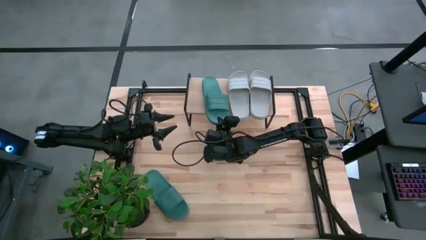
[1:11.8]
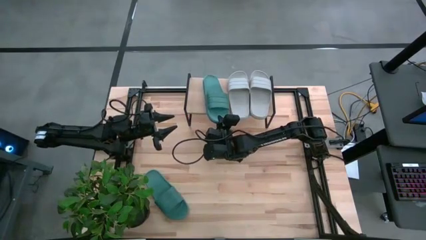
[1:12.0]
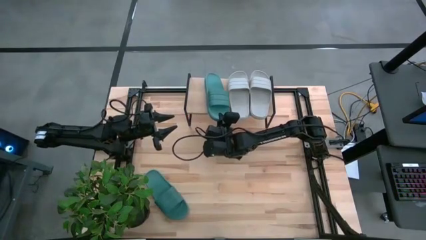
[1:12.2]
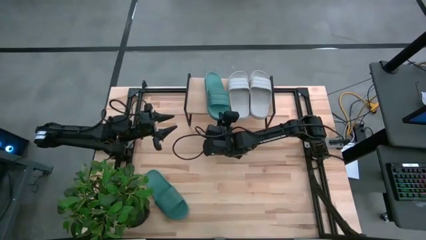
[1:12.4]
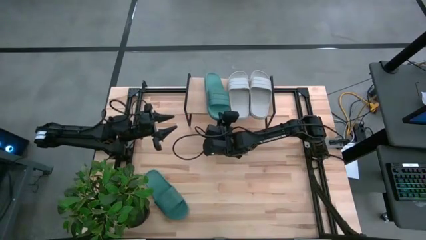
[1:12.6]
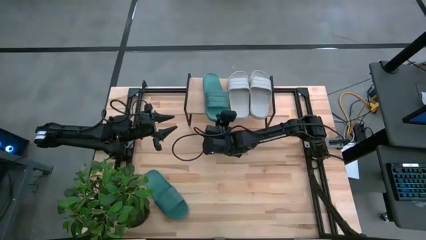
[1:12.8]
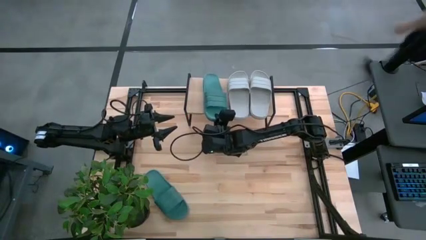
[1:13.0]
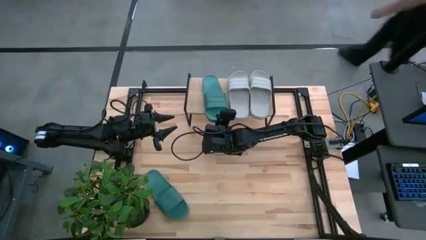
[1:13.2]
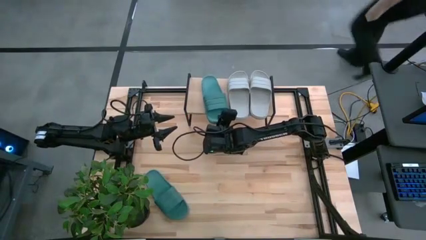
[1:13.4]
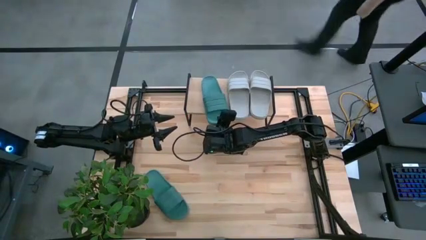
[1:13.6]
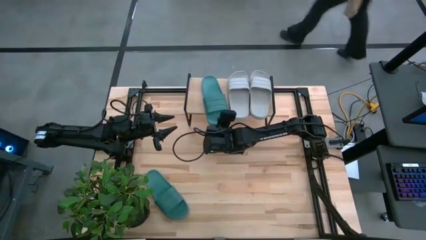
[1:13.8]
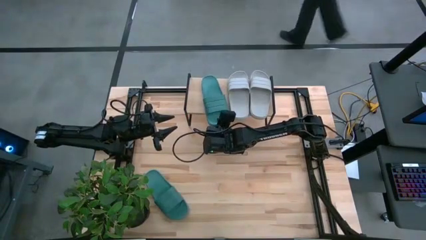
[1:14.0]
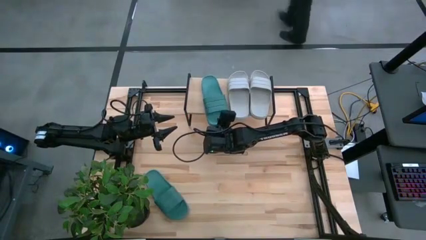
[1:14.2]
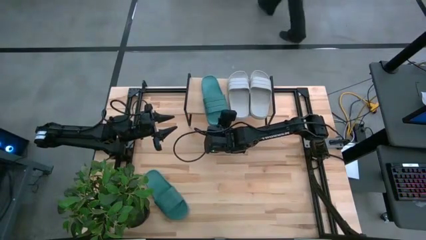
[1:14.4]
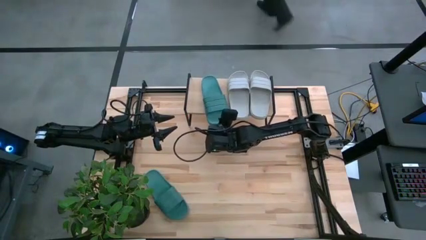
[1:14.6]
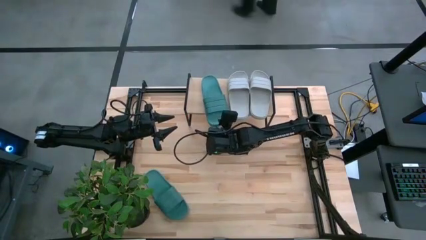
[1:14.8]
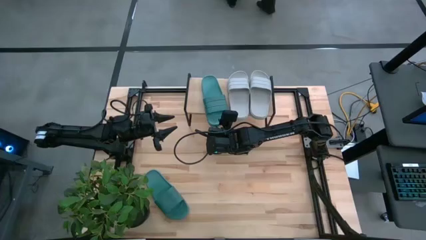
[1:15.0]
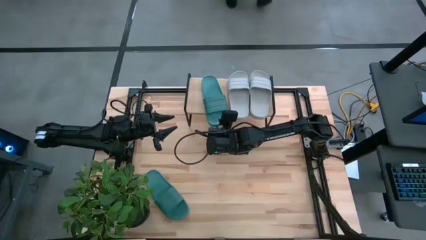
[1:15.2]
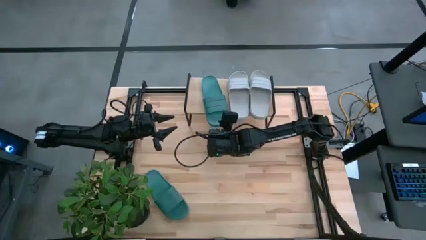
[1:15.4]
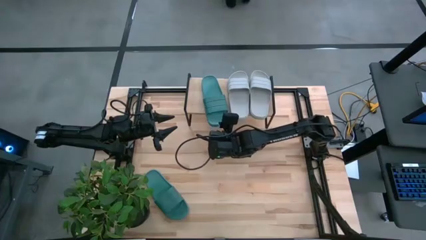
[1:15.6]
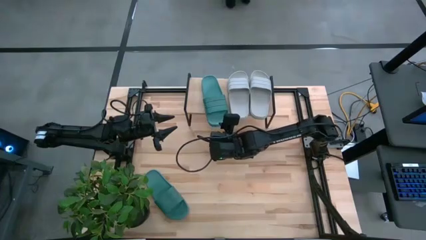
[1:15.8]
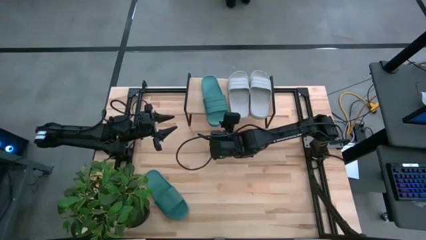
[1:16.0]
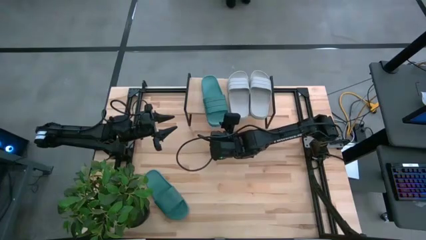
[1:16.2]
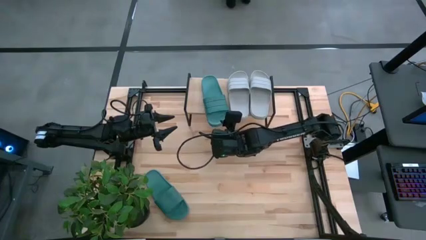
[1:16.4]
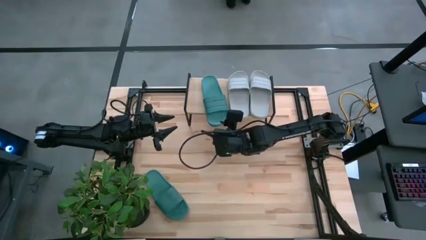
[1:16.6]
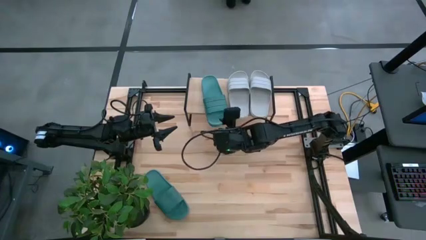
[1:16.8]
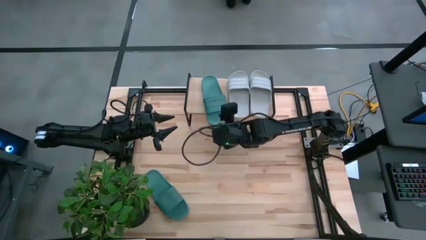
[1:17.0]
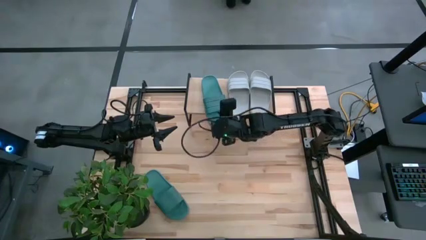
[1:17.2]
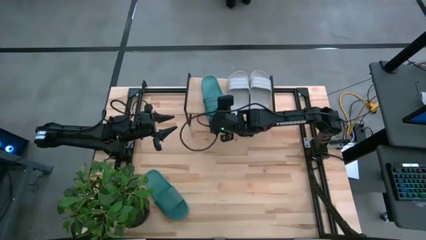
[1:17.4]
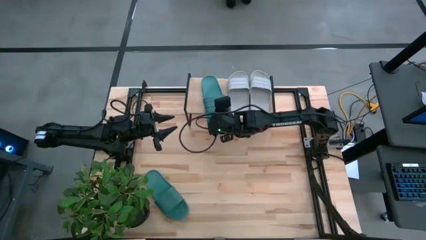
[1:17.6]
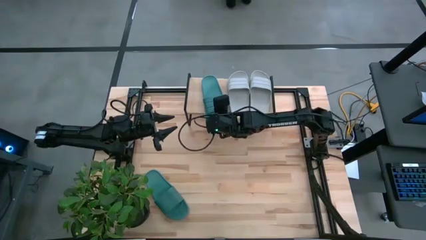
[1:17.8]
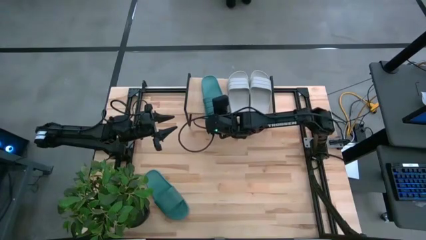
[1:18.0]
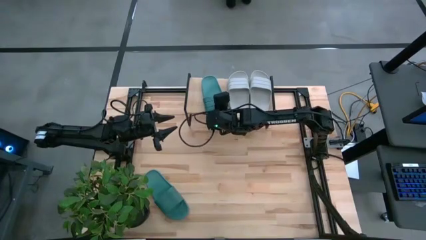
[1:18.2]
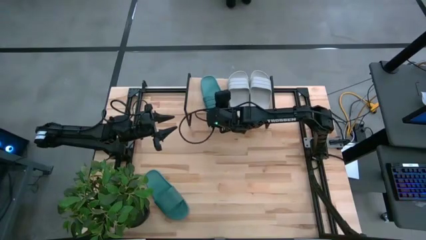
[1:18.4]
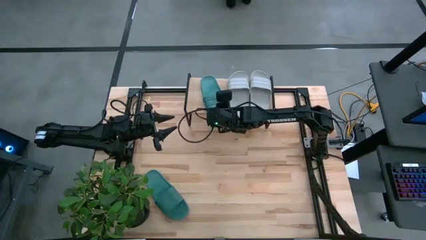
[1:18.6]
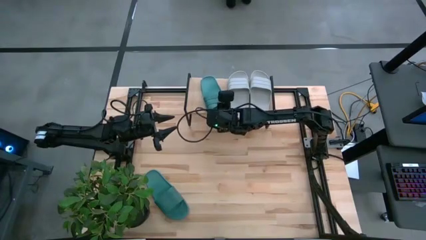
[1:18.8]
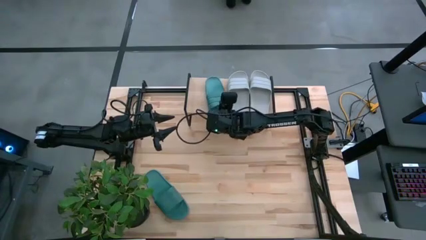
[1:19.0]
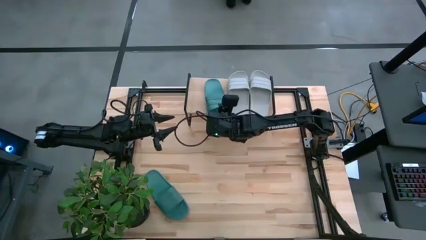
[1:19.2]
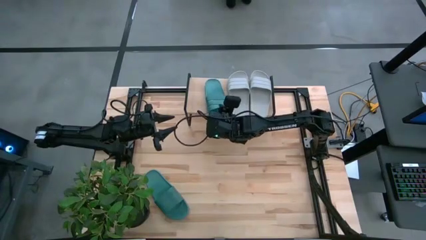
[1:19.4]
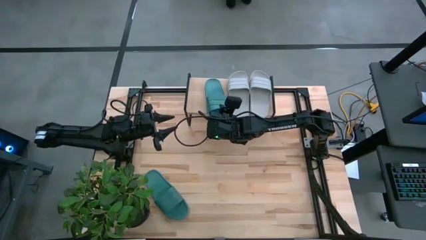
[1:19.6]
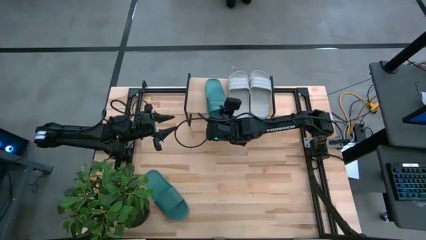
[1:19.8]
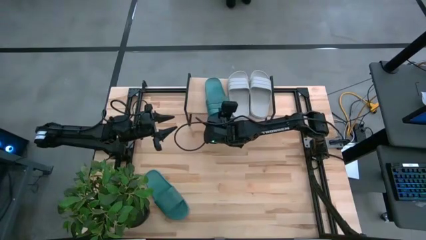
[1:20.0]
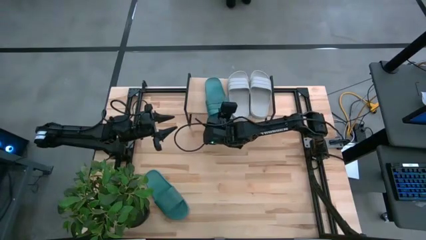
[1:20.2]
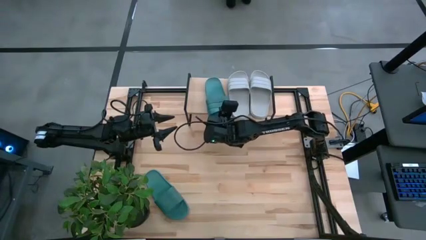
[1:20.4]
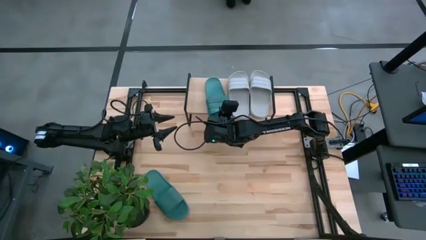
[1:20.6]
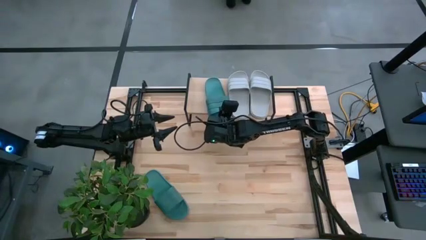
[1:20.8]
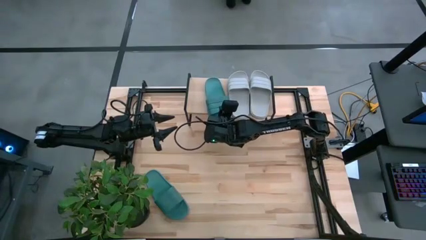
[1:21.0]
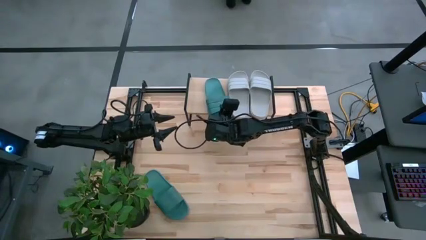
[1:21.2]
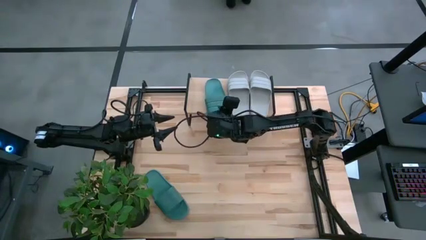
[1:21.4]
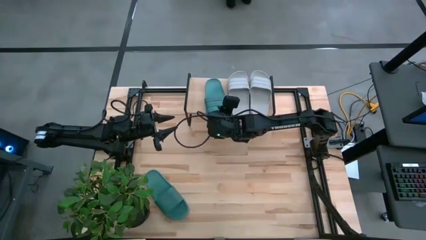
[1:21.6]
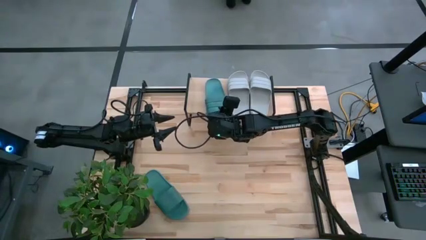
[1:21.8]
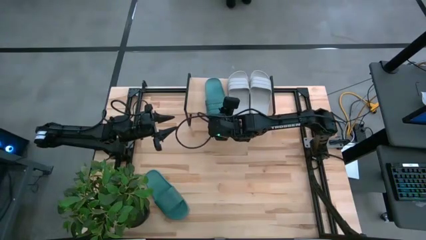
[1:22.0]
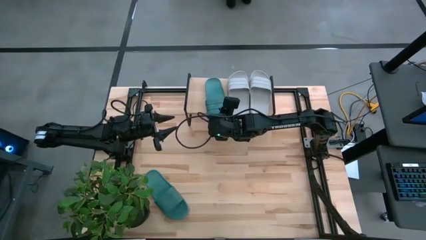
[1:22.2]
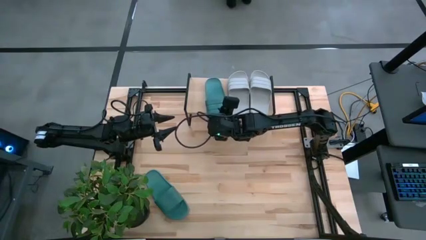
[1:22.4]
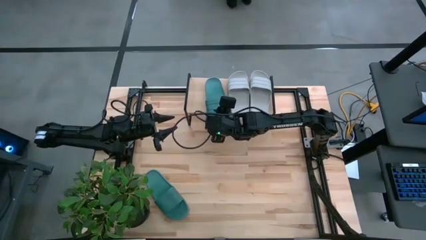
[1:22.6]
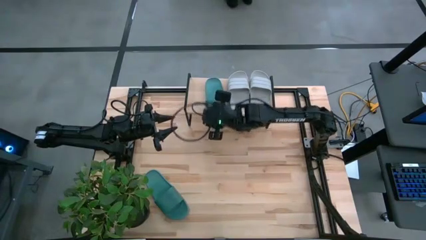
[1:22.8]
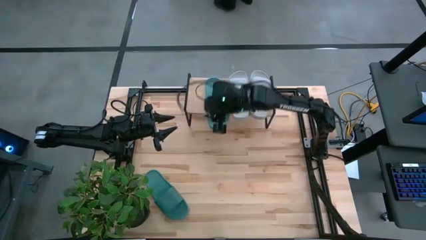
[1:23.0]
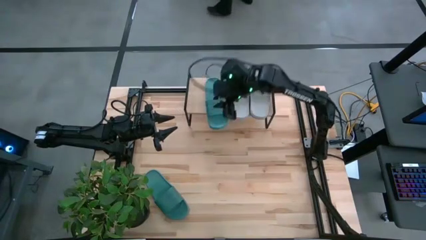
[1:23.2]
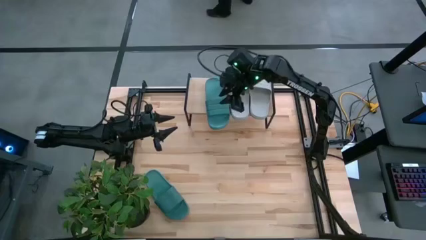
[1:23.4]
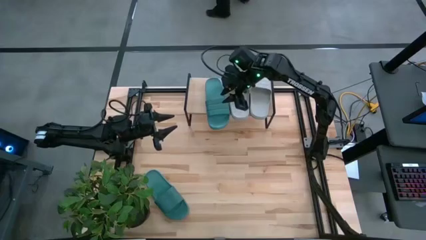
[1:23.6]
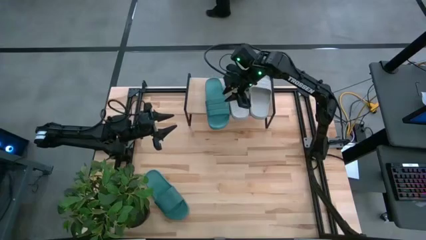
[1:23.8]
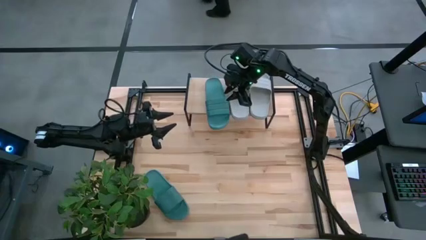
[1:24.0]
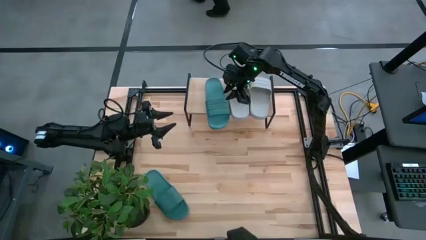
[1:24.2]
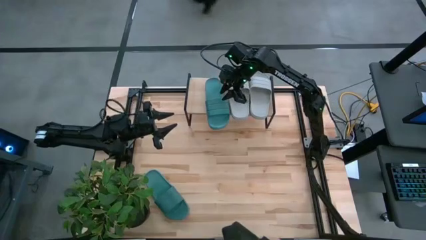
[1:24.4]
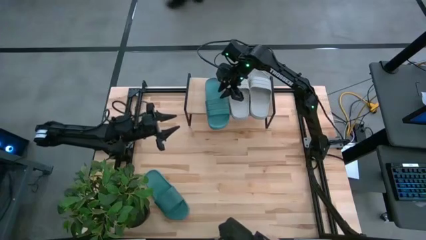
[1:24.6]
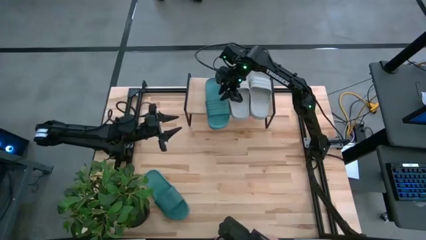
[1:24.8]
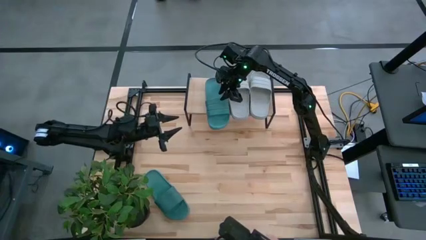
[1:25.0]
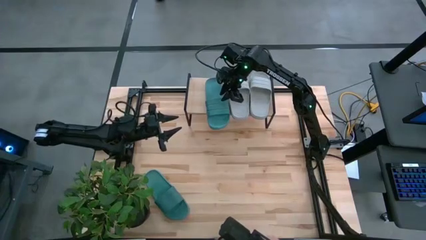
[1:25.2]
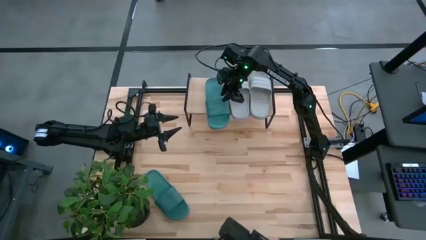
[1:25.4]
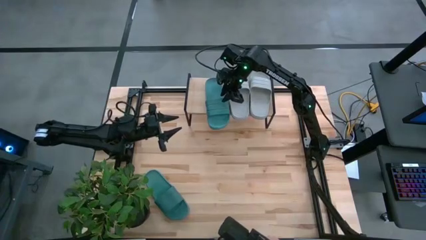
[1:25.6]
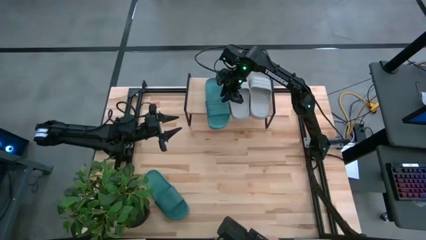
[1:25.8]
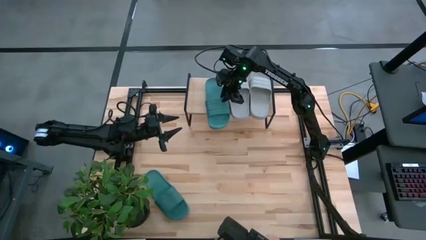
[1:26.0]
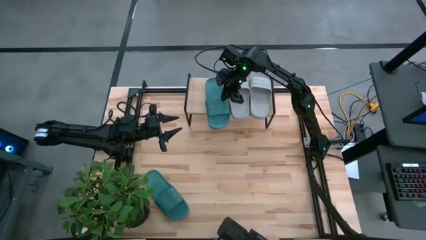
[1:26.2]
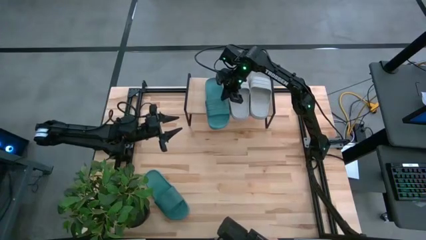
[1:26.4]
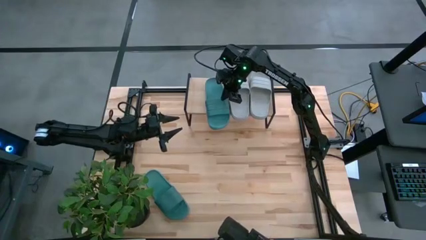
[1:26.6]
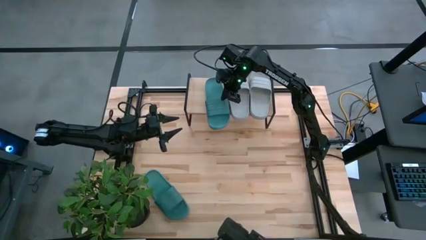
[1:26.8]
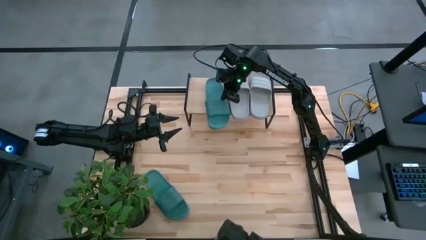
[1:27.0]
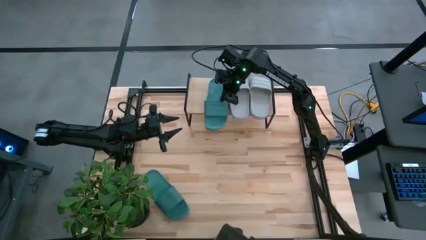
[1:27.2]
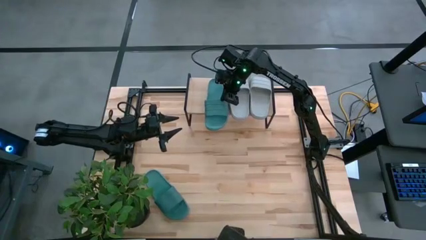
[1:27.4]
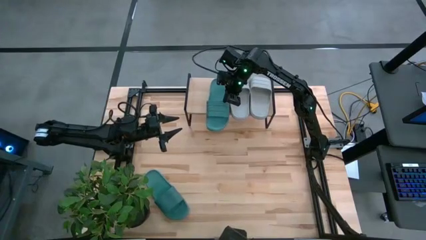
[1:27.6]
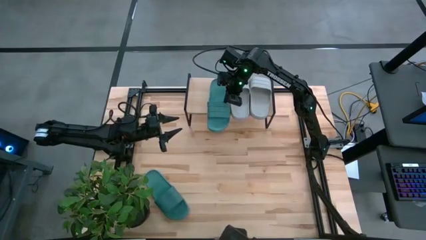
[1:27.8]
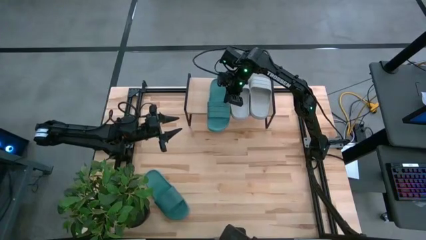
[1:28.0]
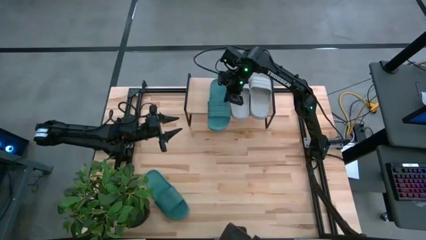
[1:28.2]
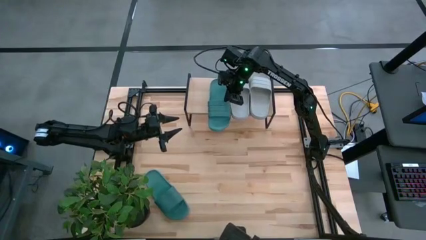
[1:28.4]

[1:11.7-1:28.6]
Task: Pick and place slides into the shelf
Put the top green slipper on the shelf
